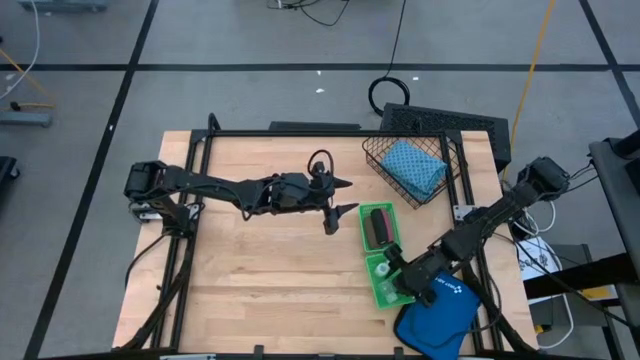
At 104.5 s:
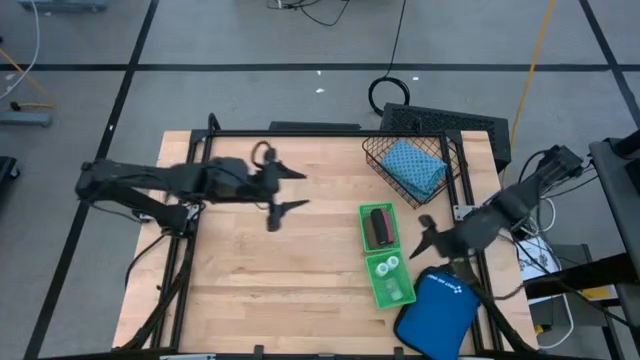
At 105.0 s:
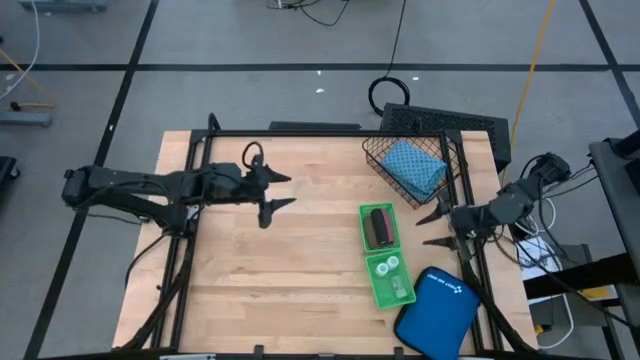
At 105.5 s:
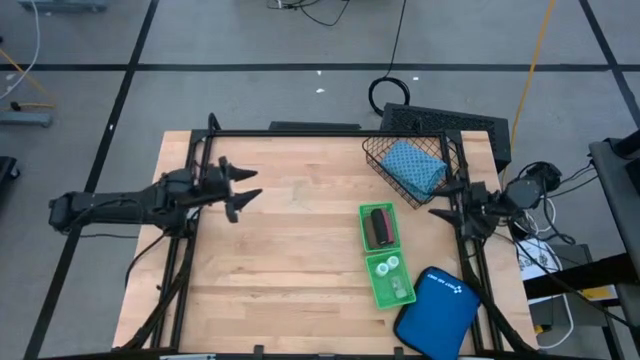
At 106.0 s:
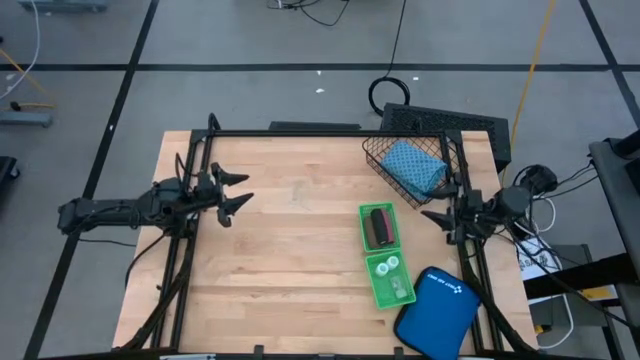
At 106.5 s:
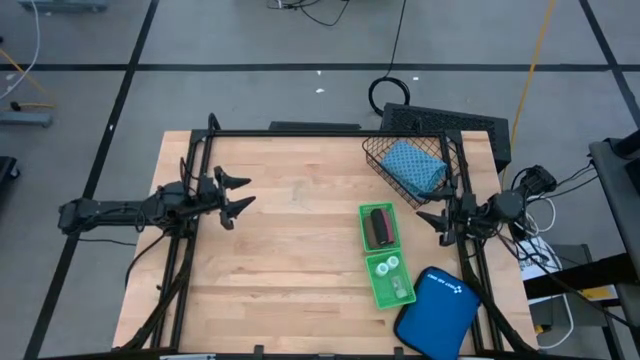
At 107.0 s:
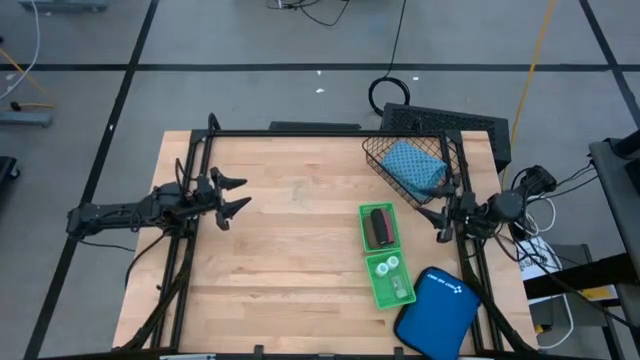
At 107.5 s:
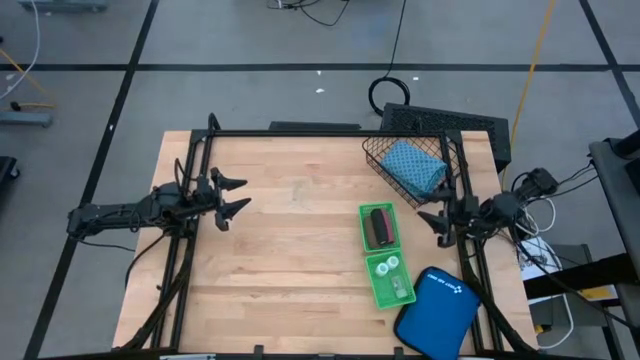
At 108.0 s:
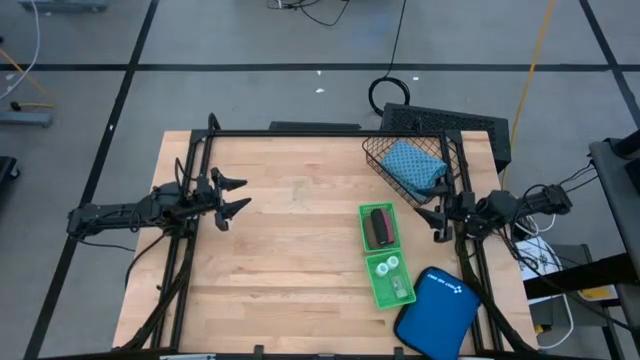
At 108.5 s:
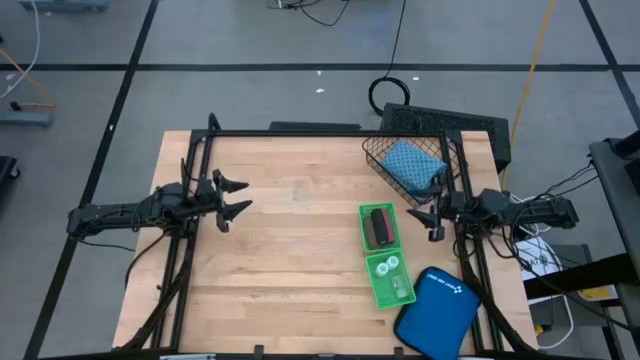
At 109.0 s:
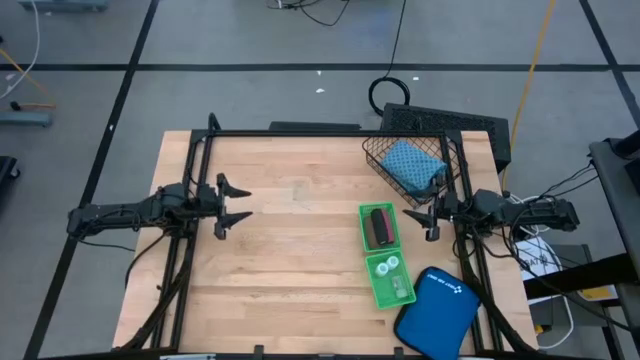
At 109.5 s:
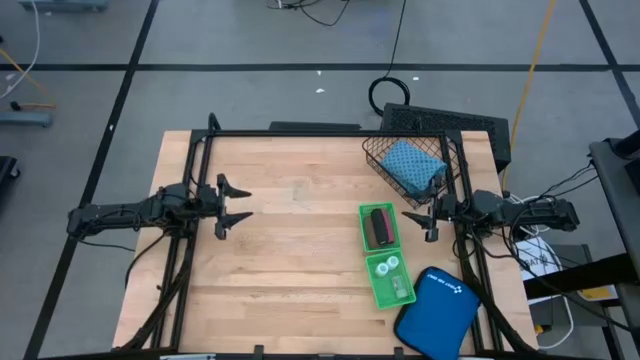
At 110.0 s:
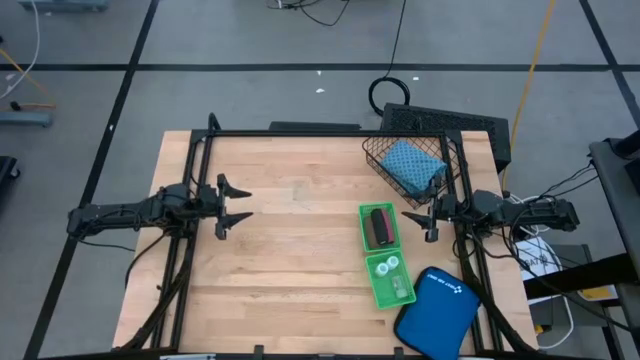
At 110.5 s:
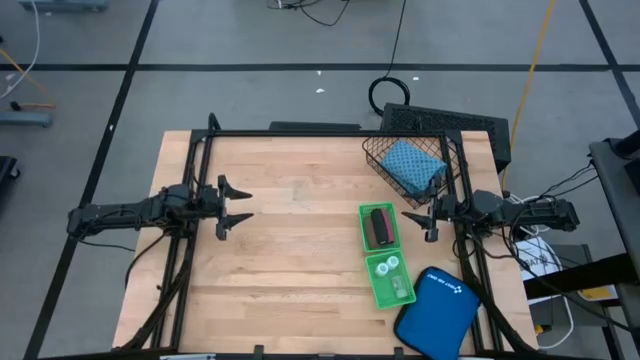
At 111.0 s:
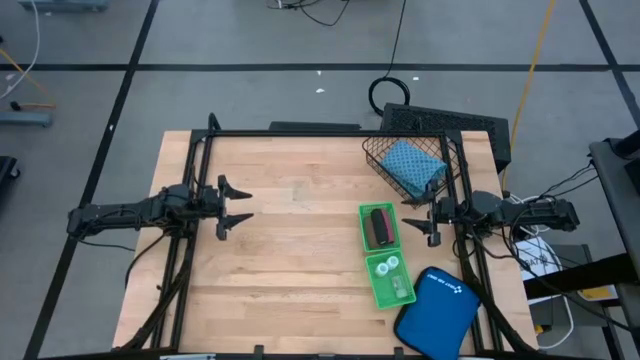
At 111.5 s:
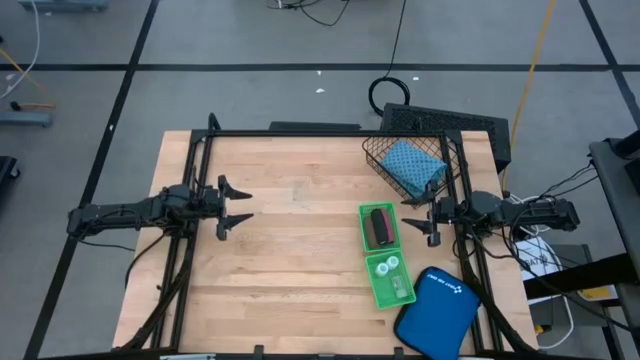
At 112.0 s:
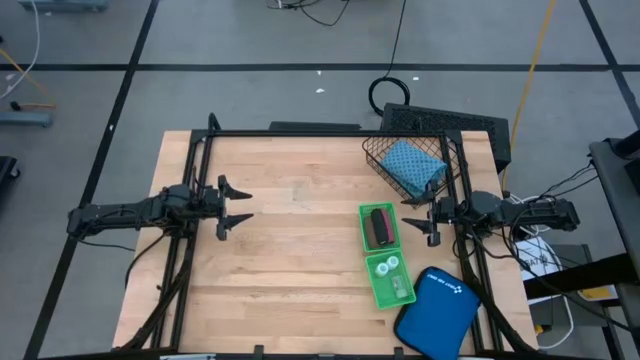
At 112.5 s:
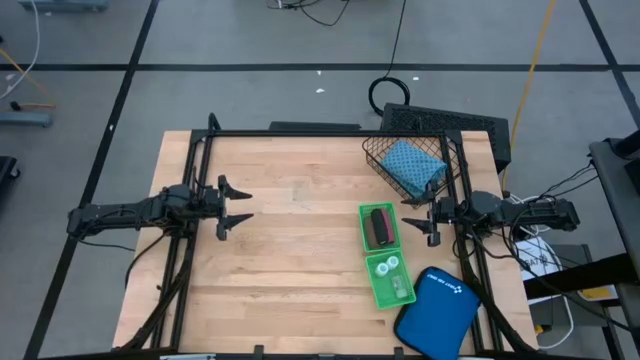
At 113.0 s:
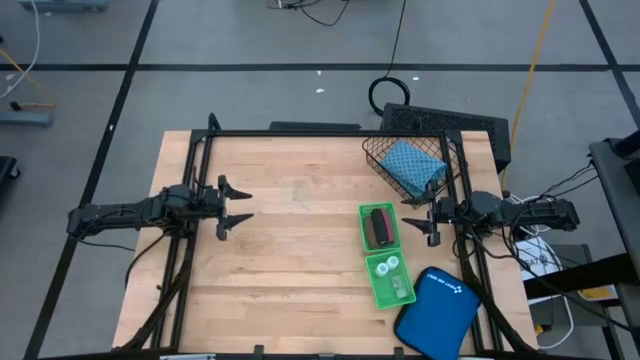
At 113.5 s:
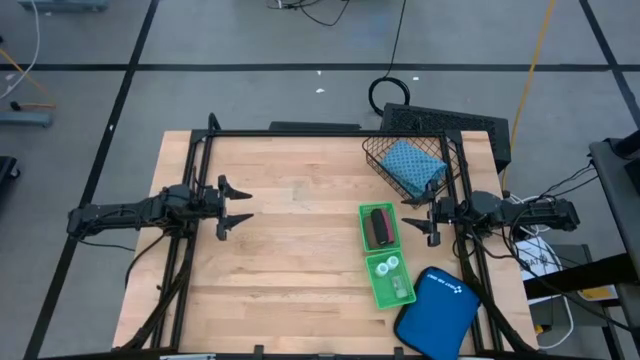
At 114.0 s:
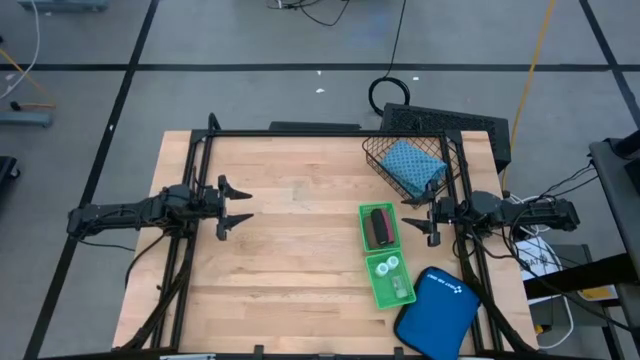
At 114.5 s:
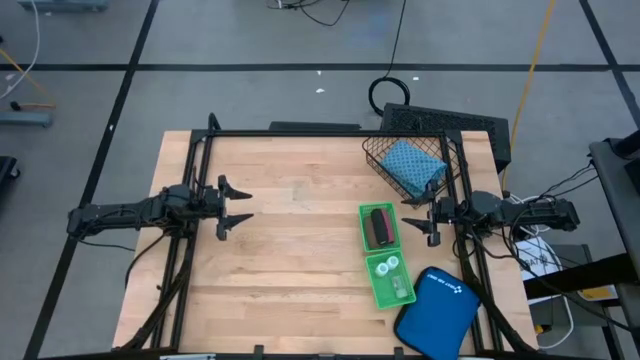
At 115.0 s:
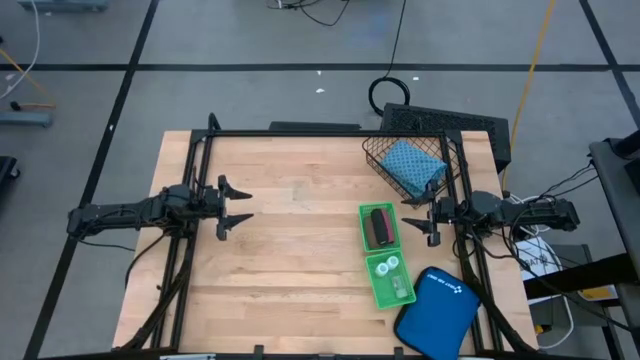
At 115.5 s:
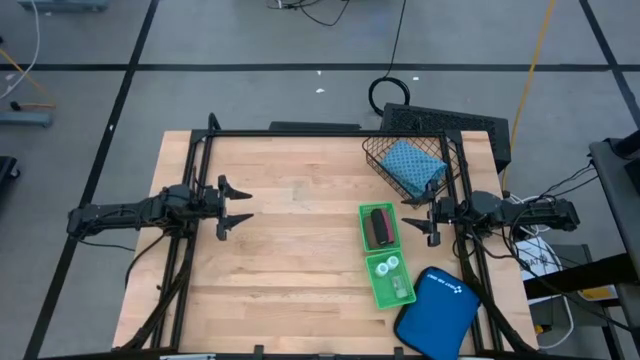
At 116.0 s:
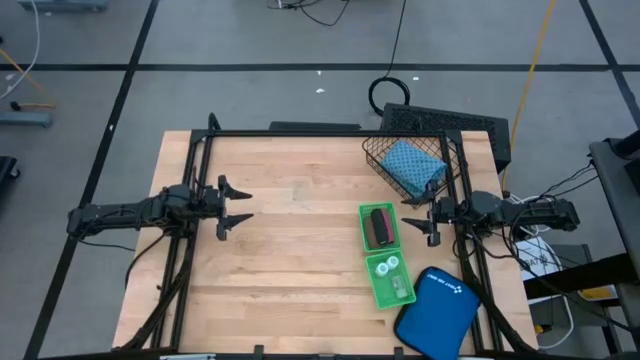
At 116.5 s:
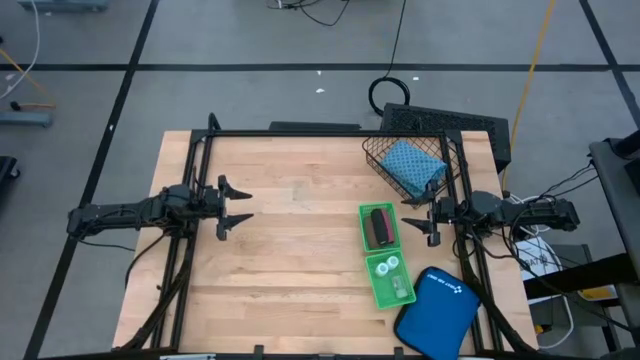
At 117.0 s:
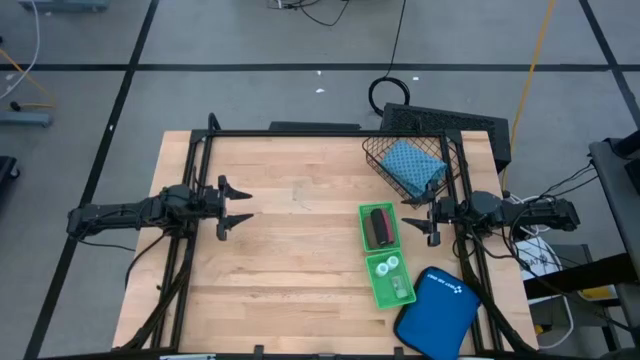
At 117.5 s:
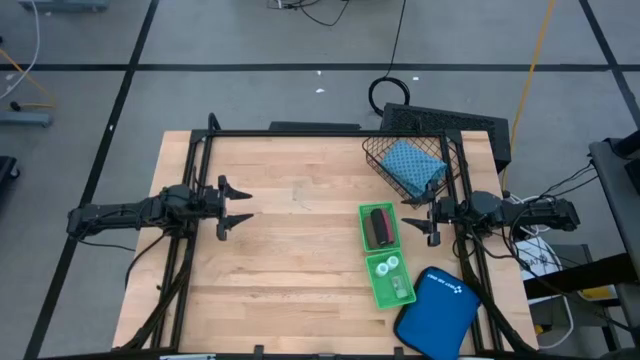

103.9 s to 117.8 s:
Task: Pick & Place Medicine items
Return to Home Position

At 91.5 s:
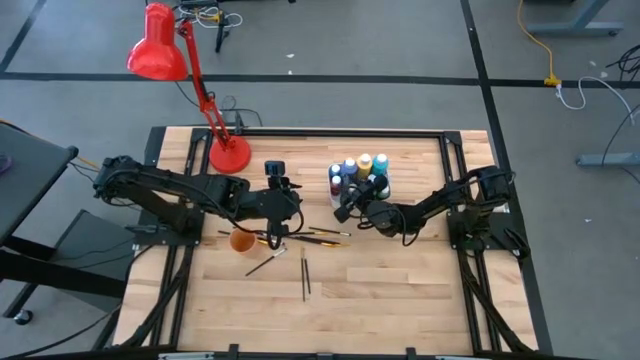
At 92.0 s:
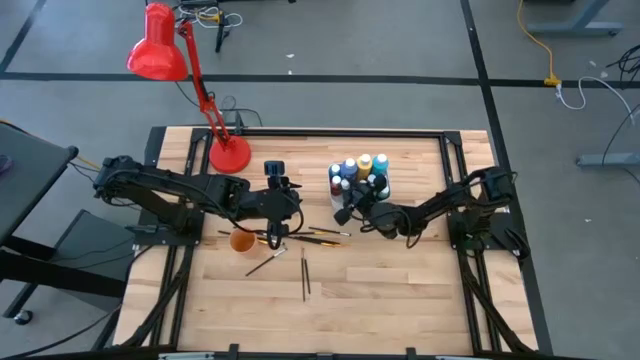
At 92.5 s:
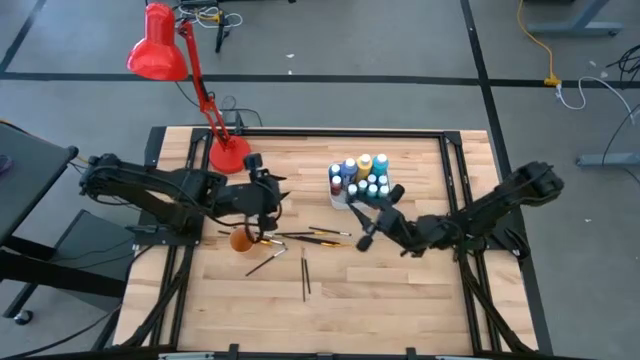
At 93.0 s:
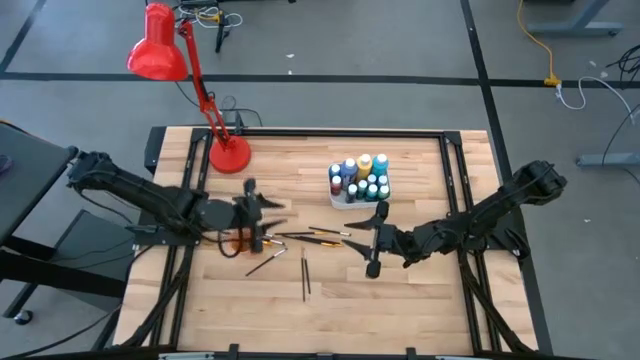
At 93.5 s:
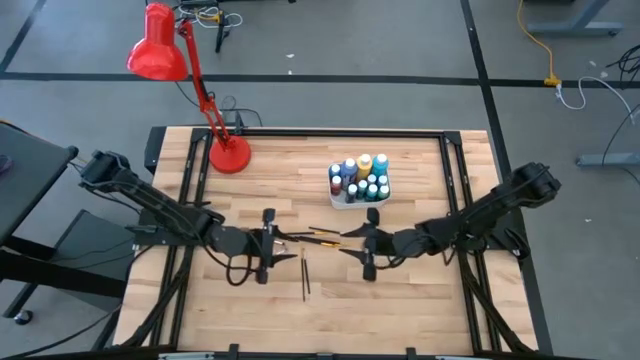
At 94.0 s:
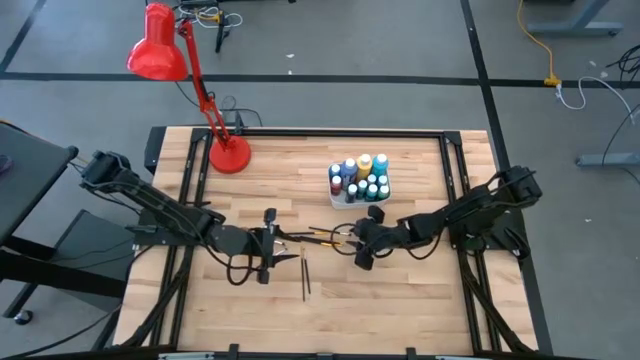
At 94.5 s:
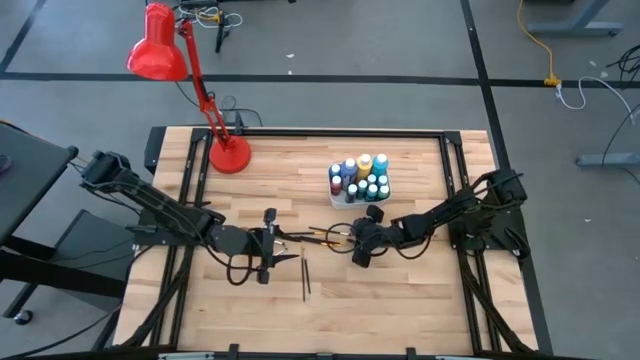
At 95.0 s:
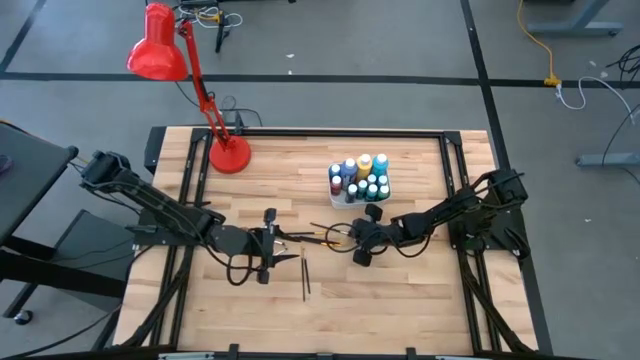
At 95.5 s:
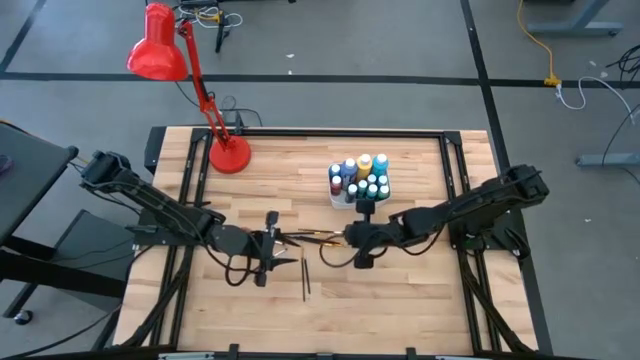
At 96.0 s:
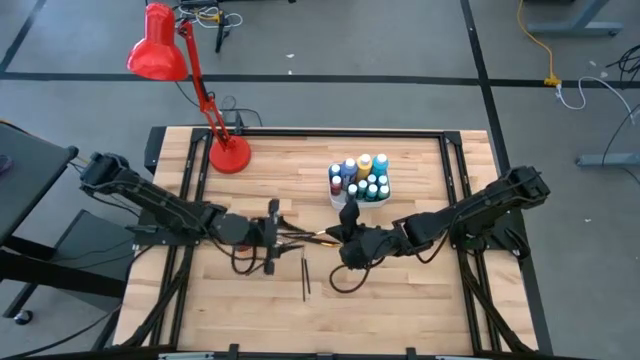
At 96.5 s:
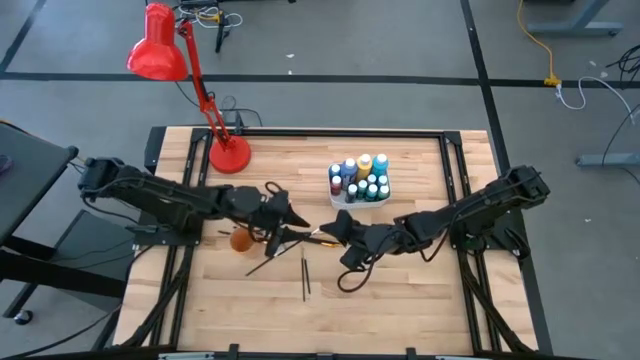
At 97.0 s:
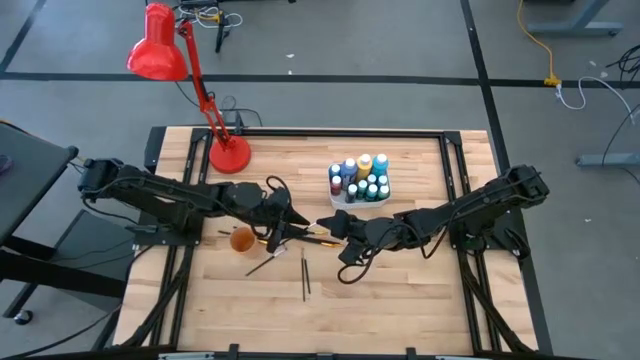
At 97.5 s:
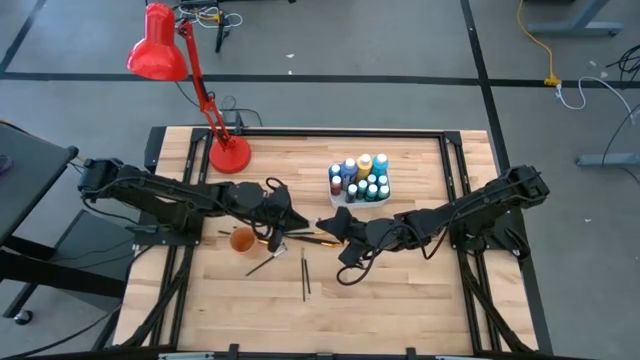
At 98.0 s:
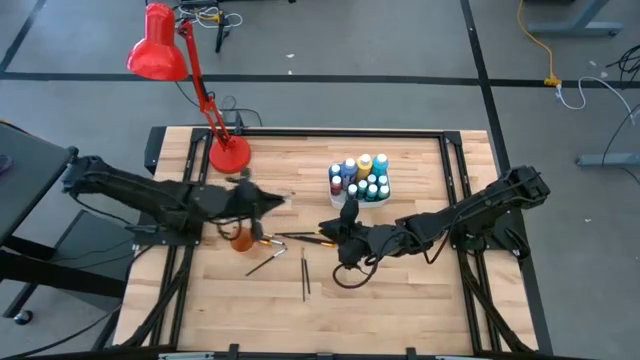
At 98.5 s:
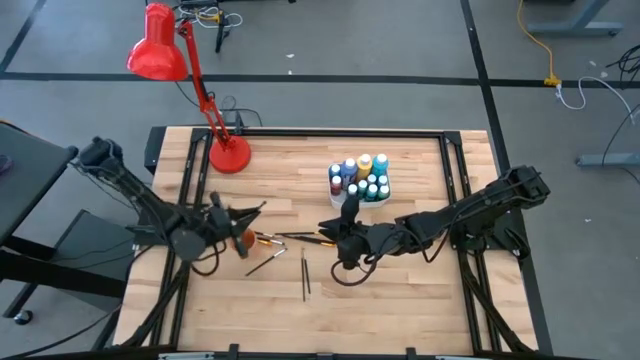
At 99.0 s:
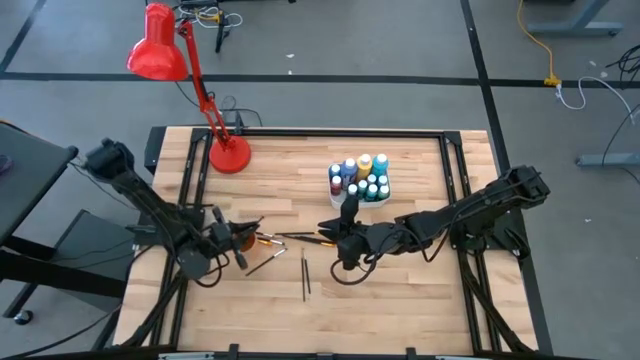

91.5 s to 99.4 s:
Task: Pick & Place Paint Supplies
Put the silver paint brush into the orange cup
